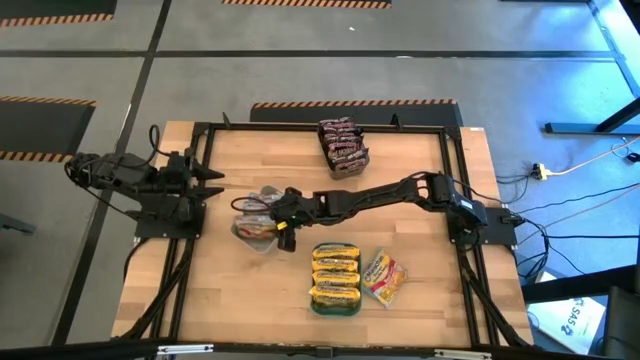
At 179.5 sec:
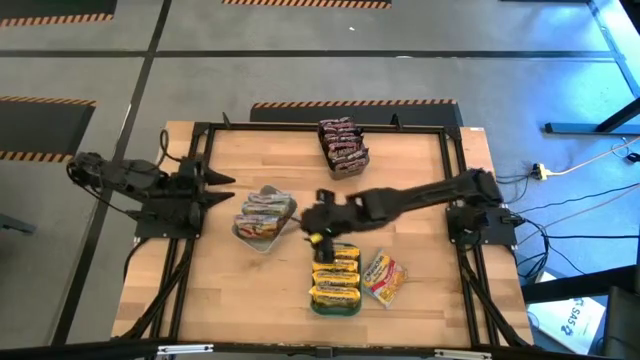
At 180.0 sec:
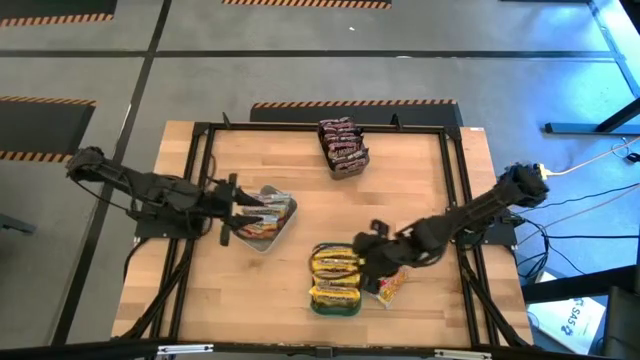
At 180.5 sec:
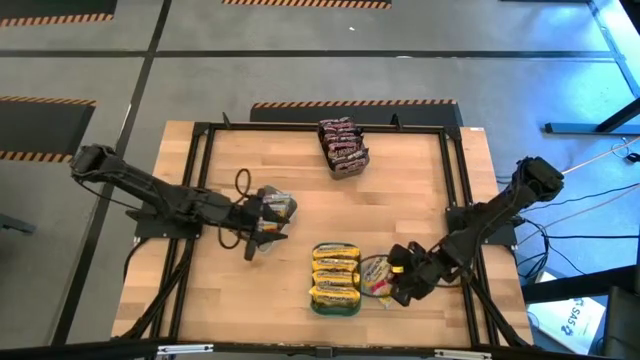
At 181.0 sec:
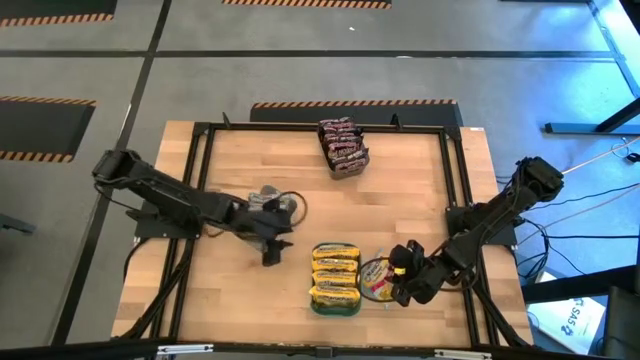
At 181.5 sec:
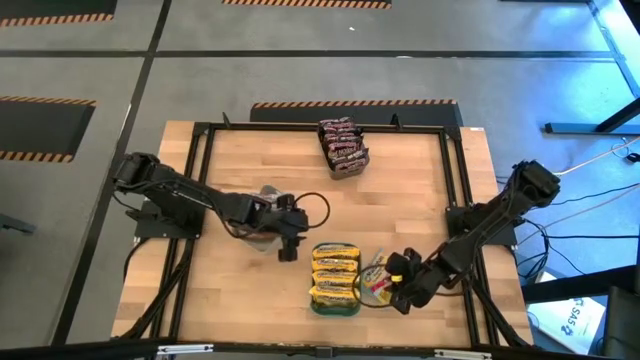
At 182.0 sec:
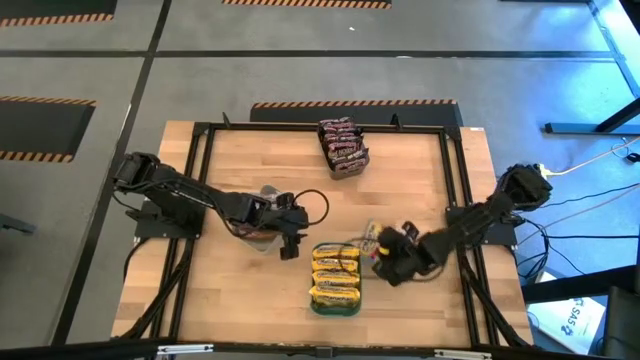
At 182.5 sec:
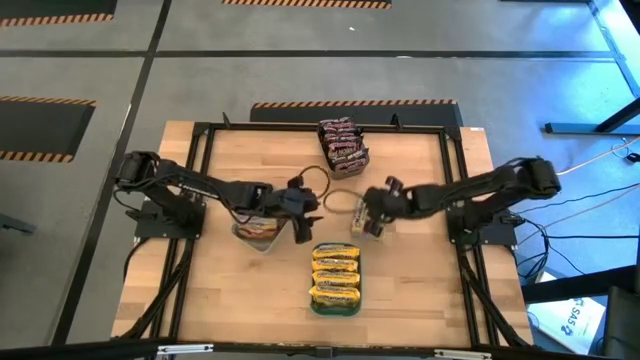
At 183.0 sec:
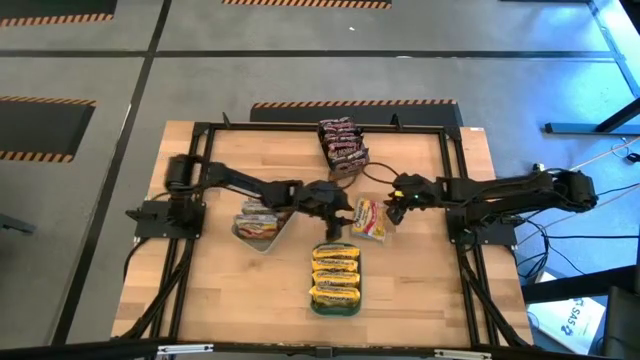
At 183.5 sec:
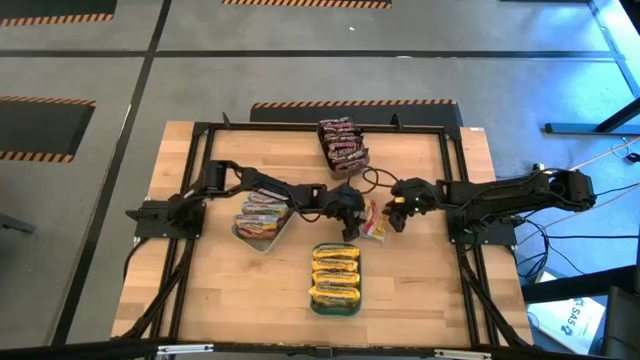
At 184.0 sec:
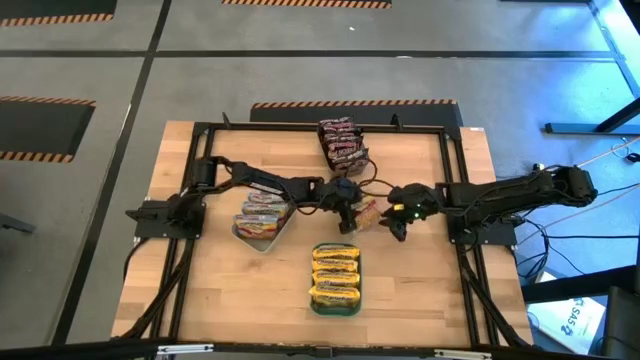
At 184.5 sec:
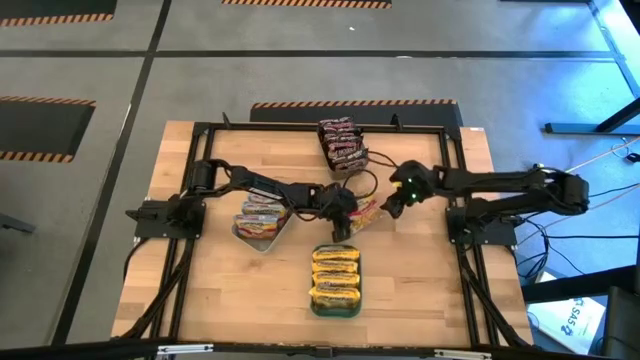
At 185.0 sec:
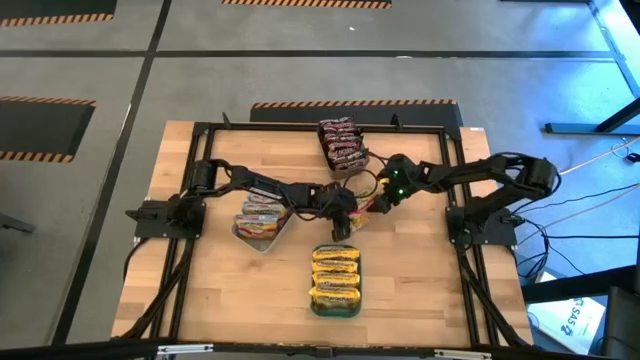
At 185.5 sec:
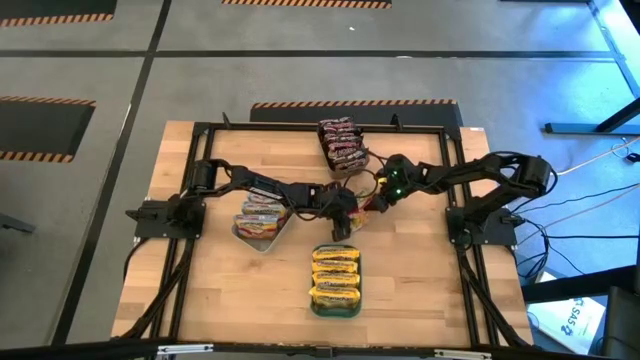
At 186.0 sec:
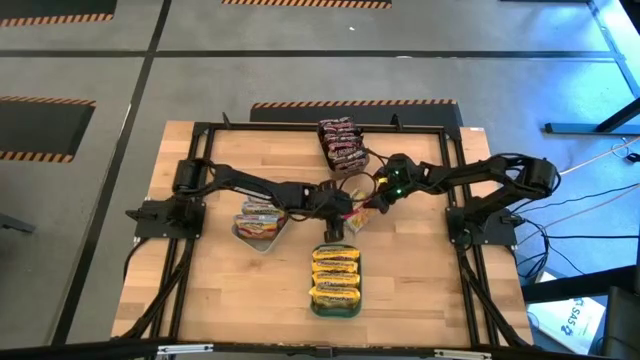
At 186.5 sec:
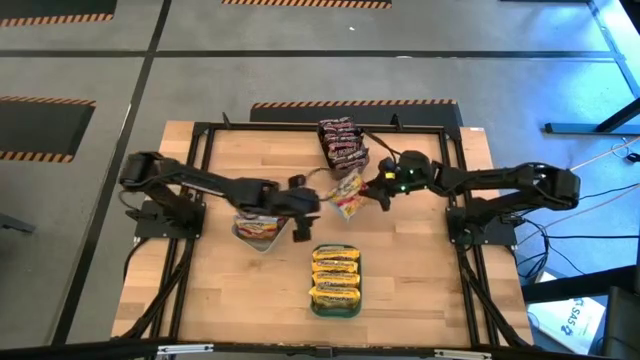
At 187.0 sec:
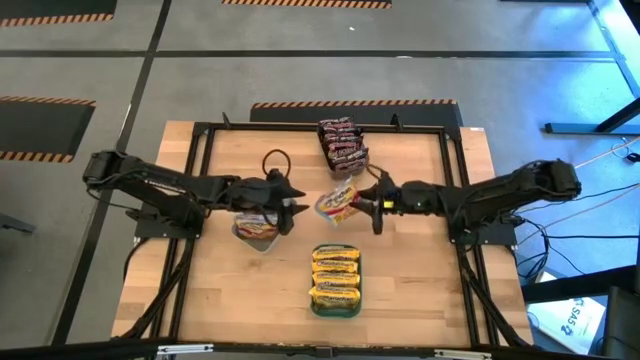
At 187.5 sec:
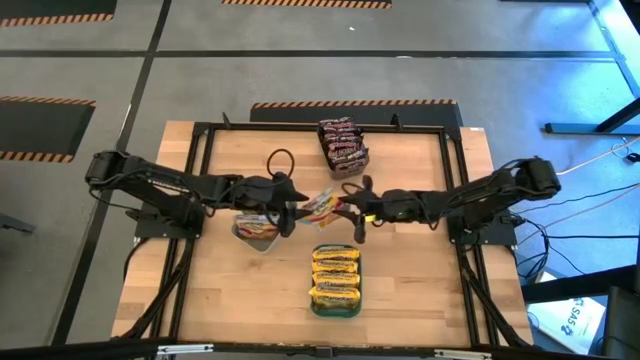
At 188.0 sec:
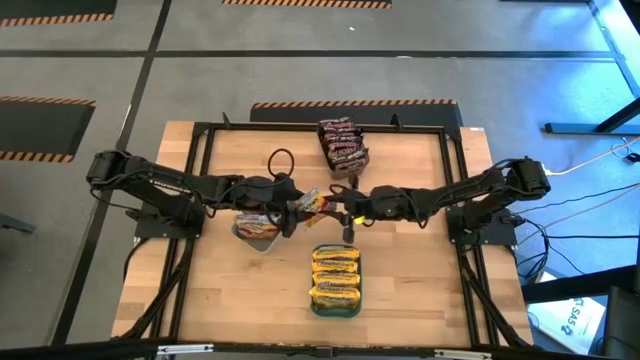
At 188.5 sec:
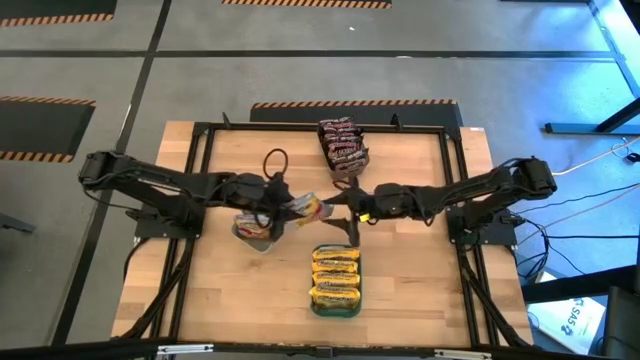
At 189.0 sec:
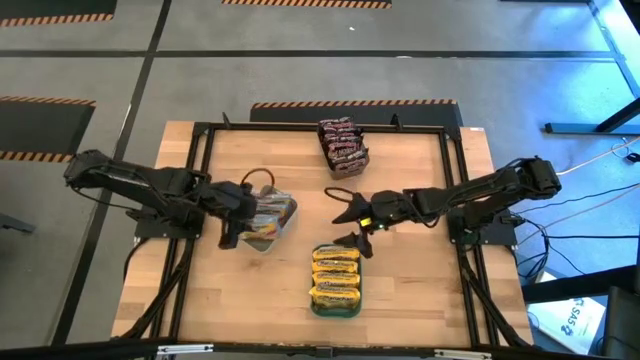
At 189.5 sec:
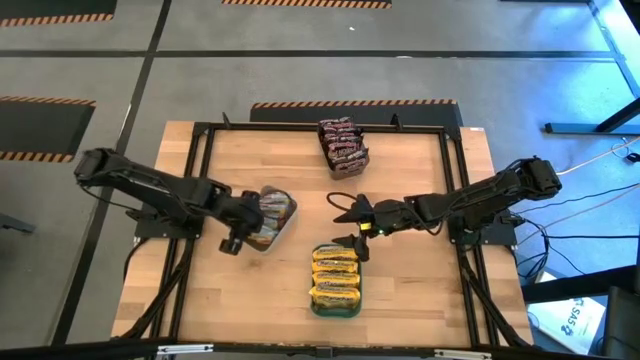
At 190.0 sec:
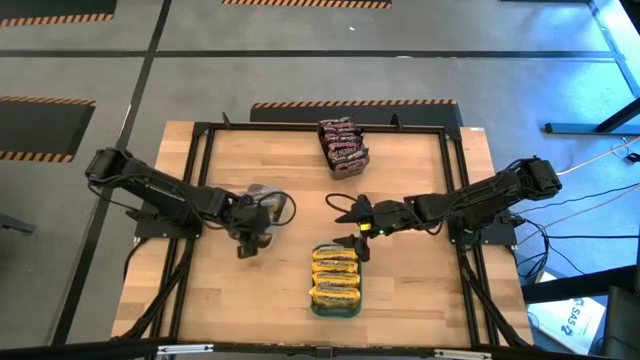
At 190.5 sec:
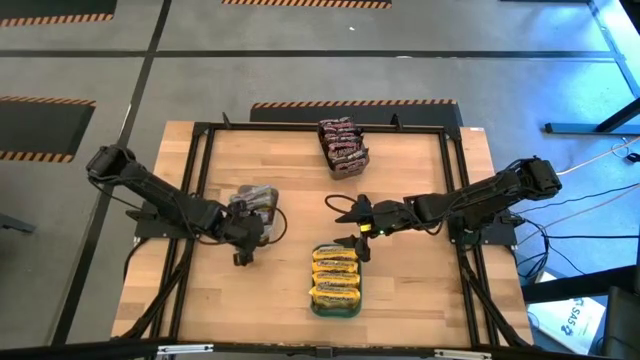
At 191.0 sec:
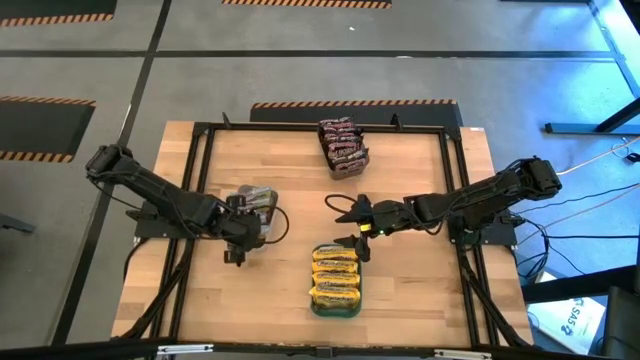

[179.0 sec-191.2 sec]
Task: Sort Maruchan noodles
Put the blue noodle pack into the white bin

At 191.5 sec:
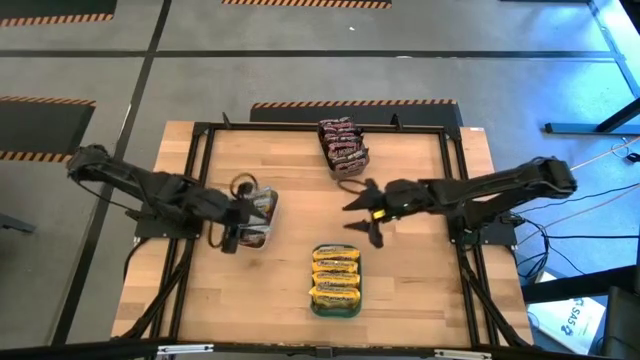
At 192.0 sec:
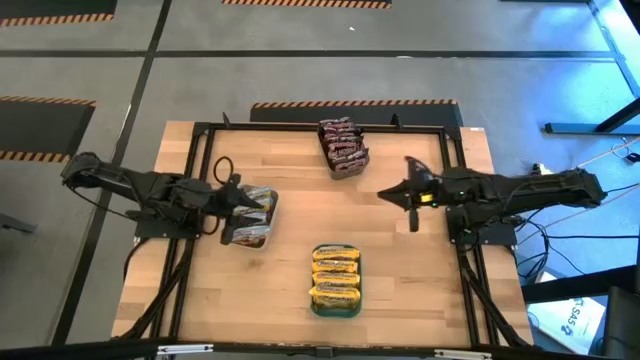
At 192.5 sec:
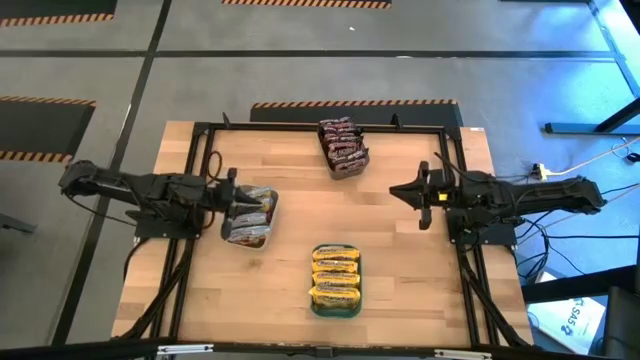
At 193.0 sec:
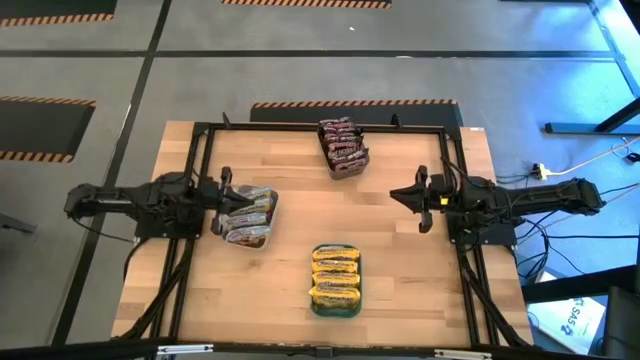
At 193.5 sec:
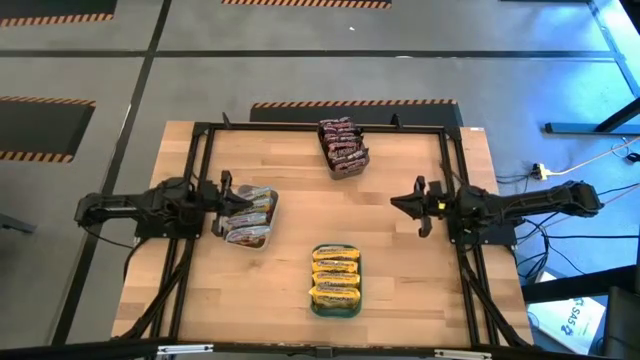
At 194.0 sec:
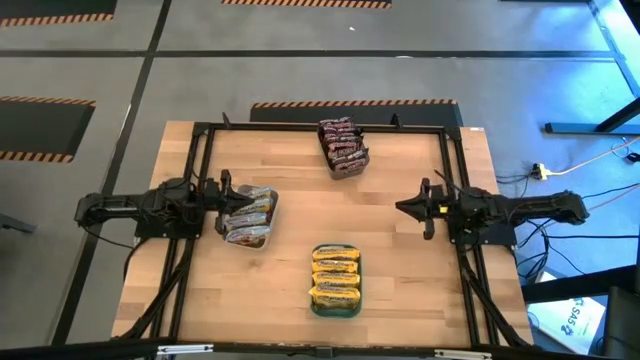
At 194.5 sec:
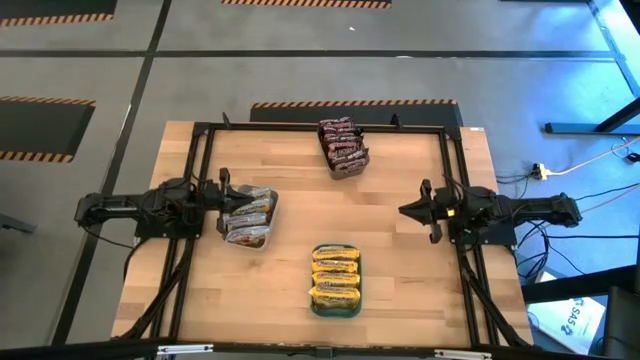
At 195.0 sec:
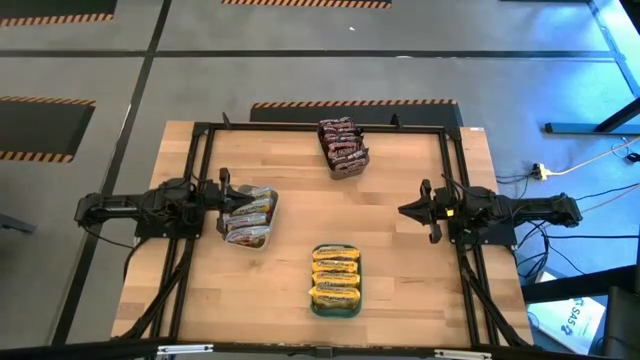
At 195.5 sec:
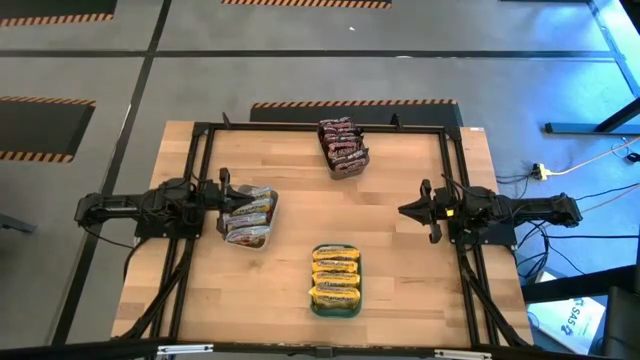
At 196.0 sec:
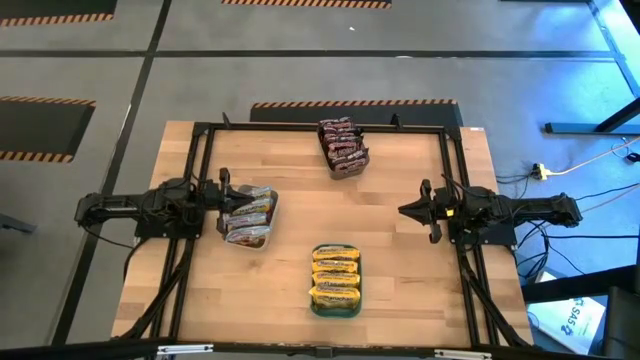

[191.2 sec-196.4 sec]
Return to Home Position

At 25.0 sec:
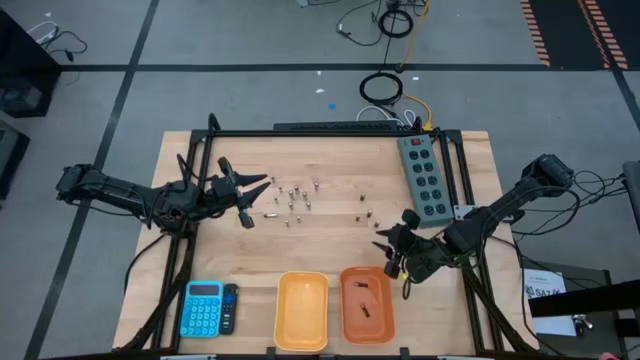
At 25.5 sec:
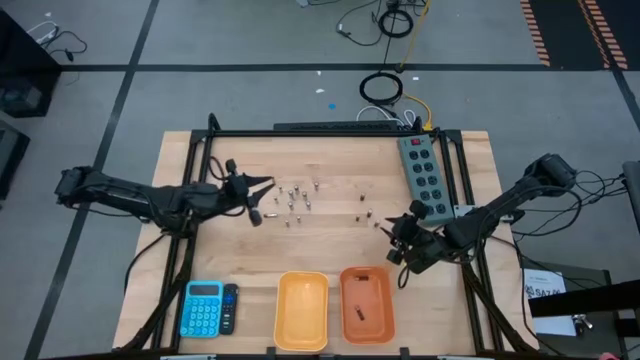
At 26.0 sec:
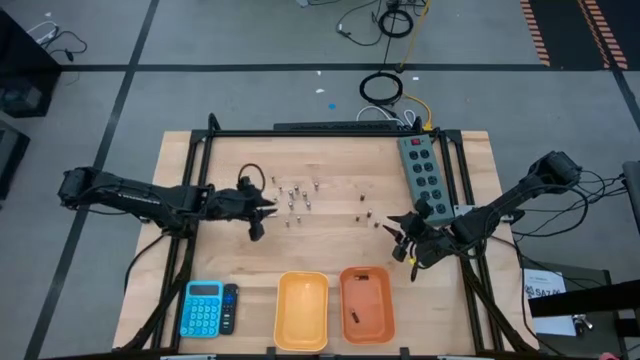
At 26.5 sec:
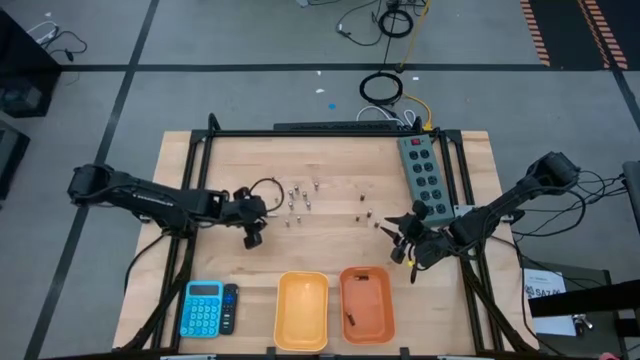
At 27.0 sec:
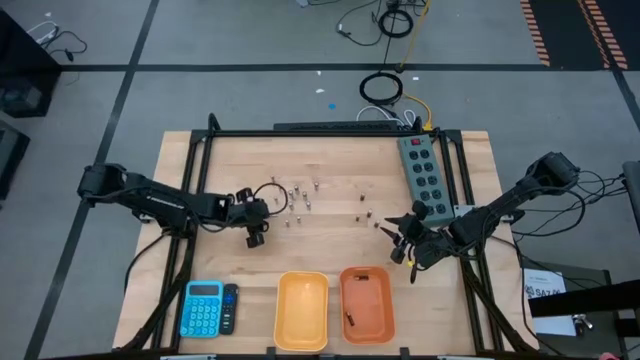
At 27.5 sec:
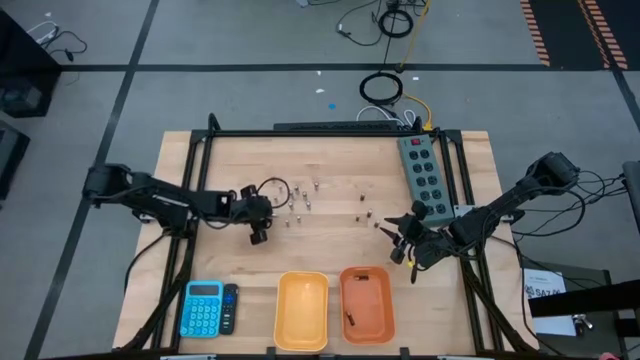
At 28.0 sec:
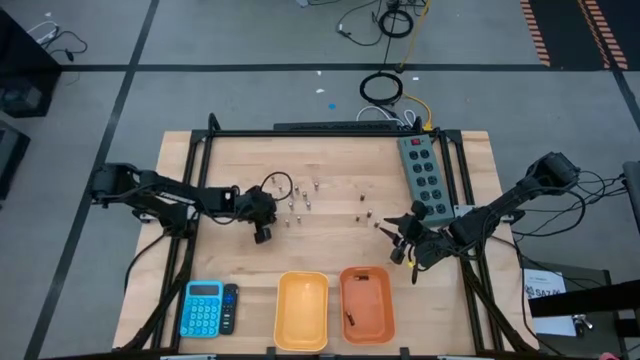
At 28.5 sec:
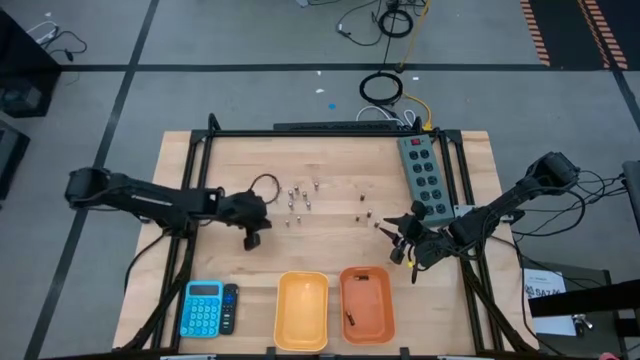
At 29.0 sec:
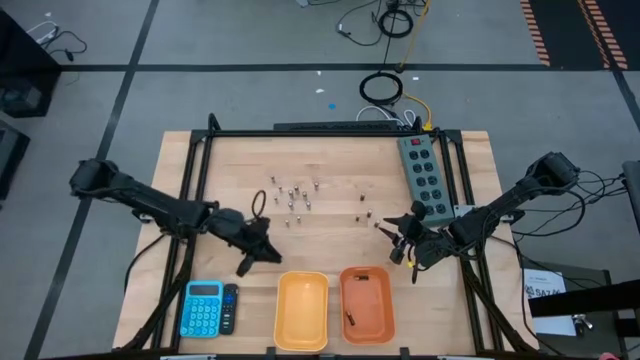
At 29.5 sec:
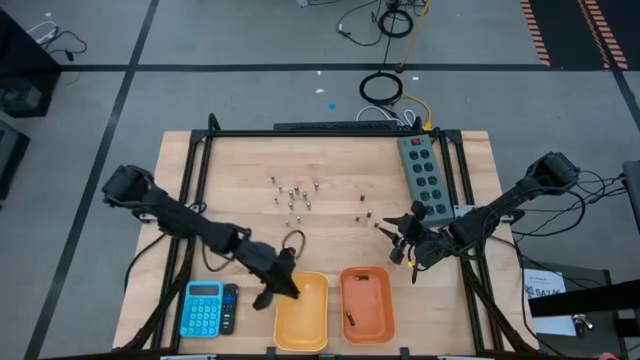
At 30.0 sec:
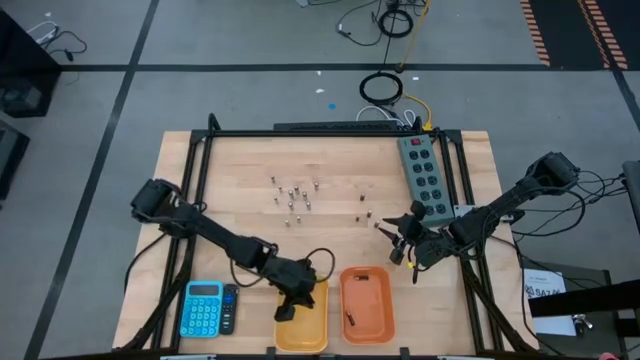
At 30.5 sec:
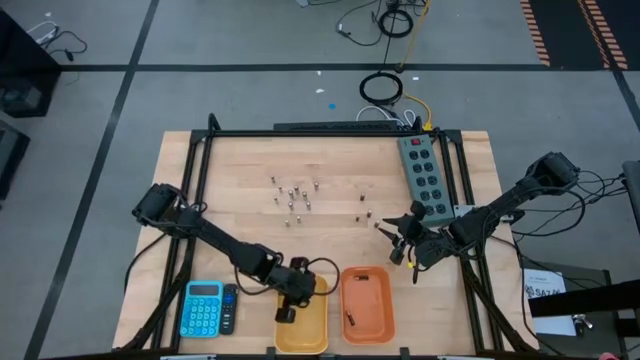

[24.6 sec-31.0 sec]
Task: Sort batteries
Put the silver battery into the yellow bin
